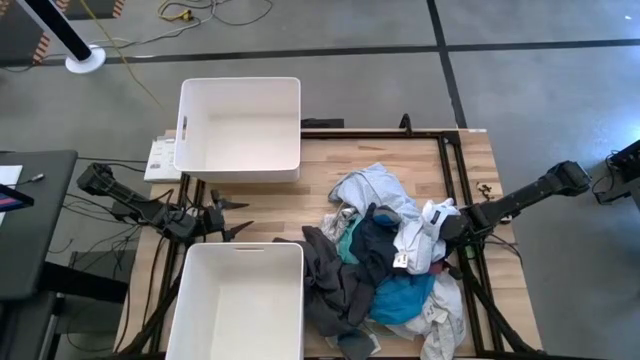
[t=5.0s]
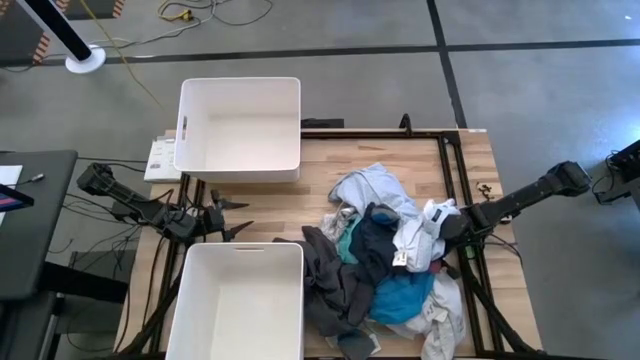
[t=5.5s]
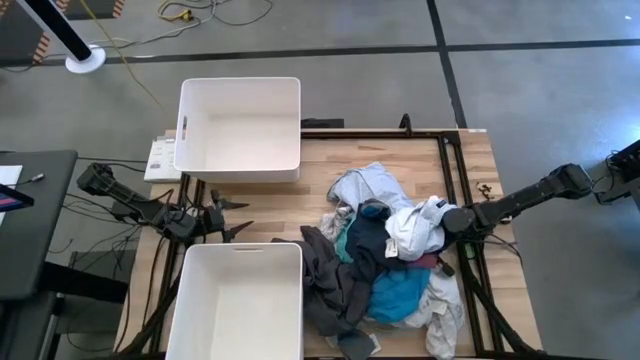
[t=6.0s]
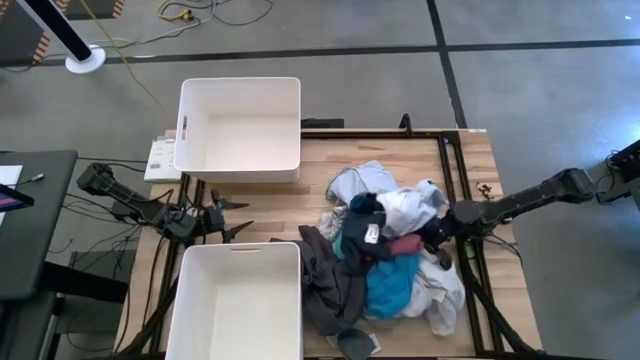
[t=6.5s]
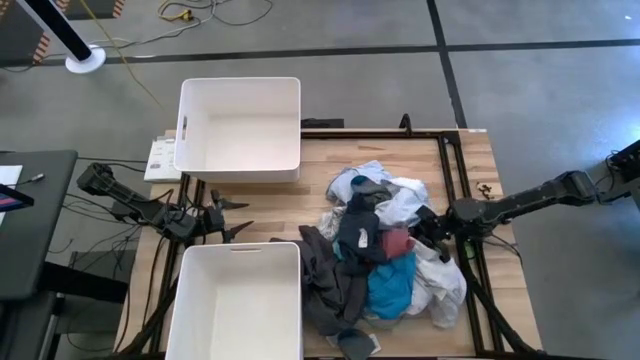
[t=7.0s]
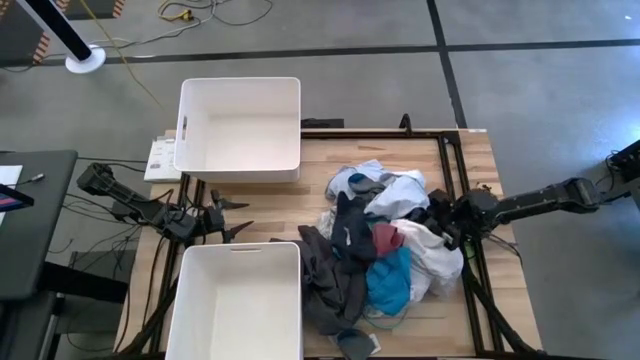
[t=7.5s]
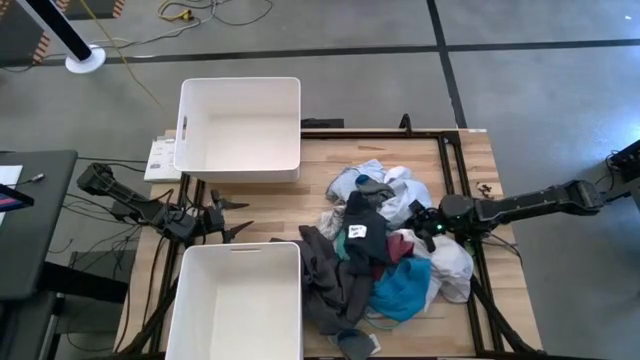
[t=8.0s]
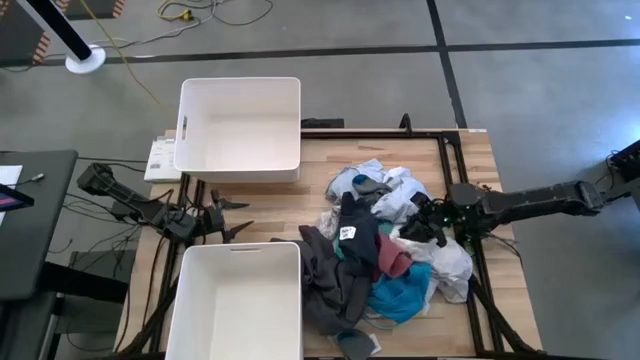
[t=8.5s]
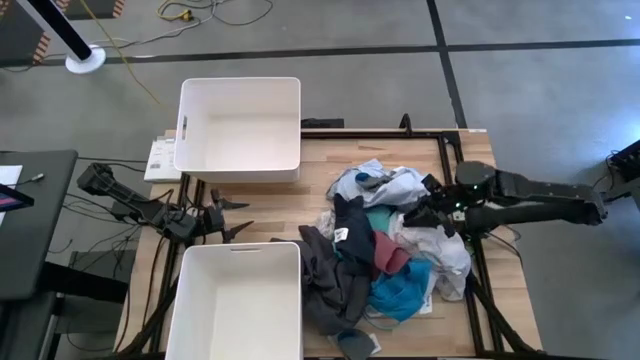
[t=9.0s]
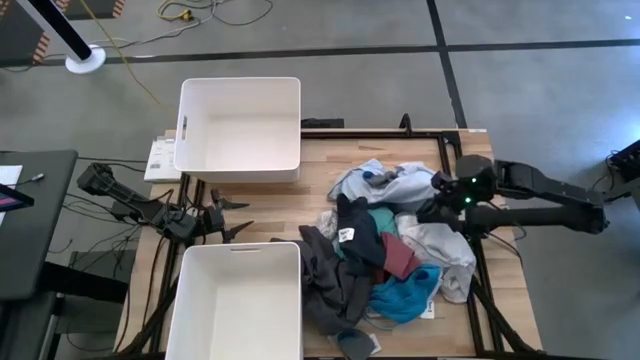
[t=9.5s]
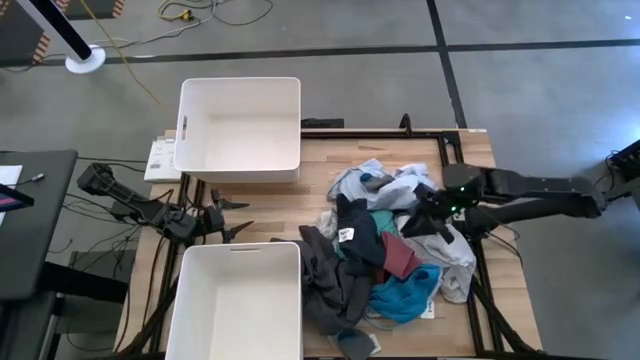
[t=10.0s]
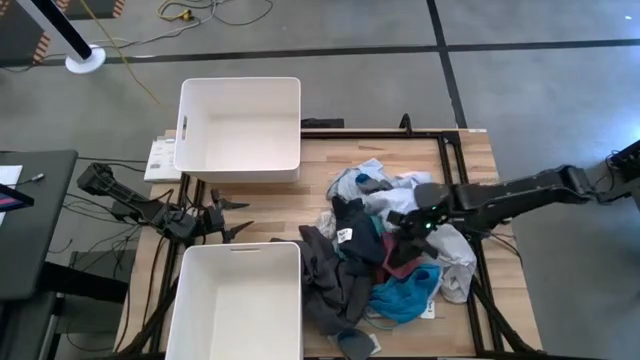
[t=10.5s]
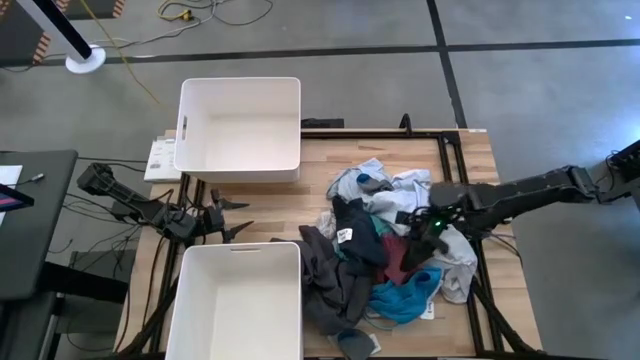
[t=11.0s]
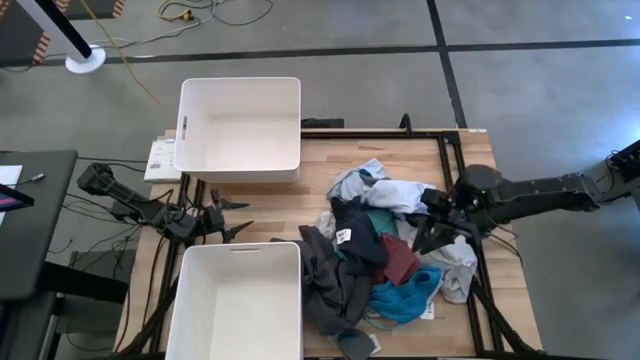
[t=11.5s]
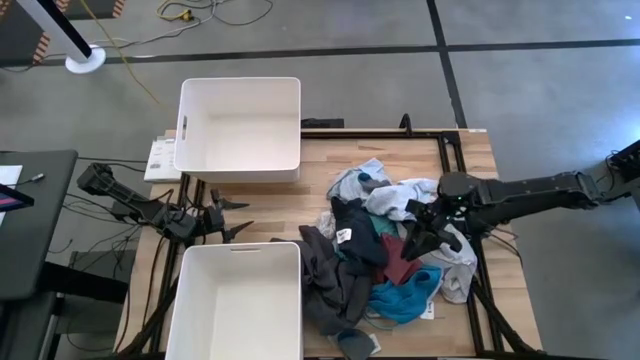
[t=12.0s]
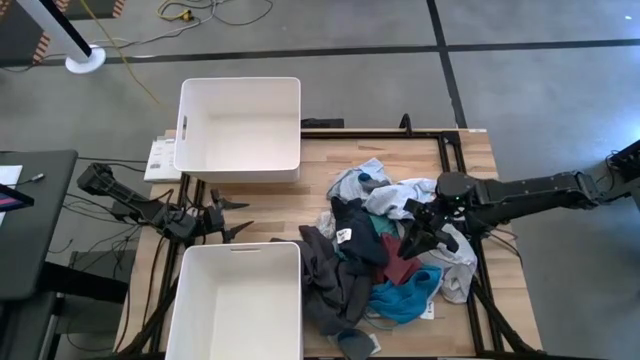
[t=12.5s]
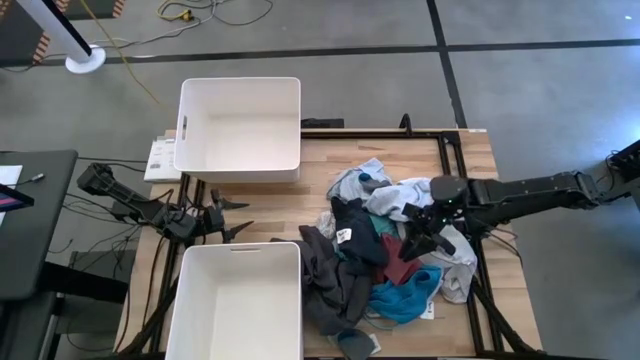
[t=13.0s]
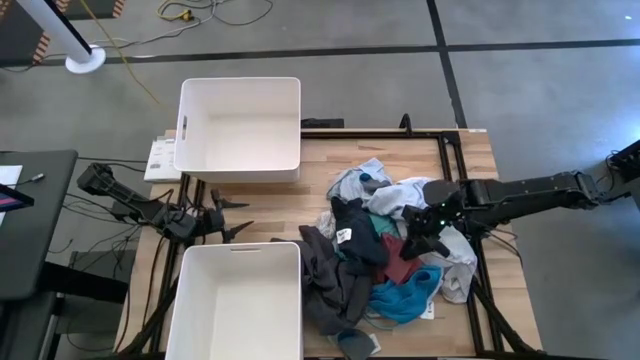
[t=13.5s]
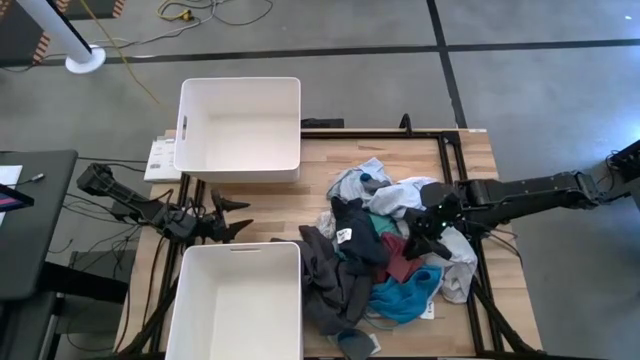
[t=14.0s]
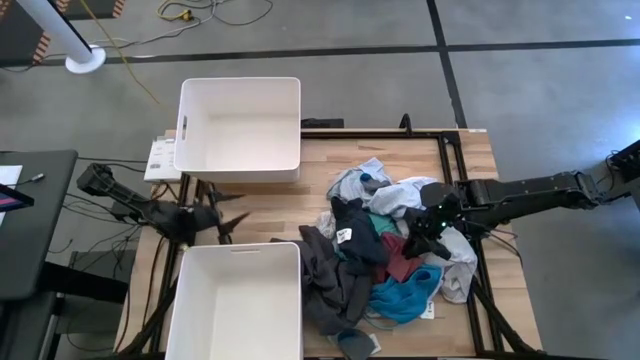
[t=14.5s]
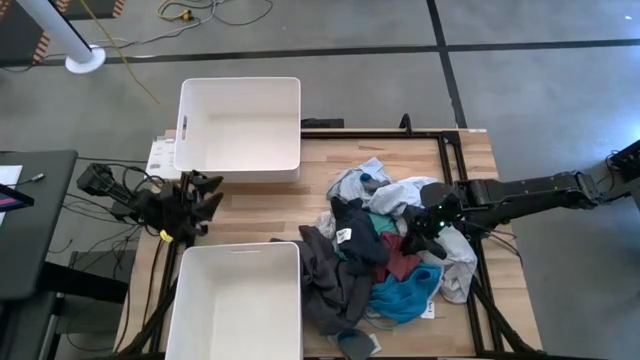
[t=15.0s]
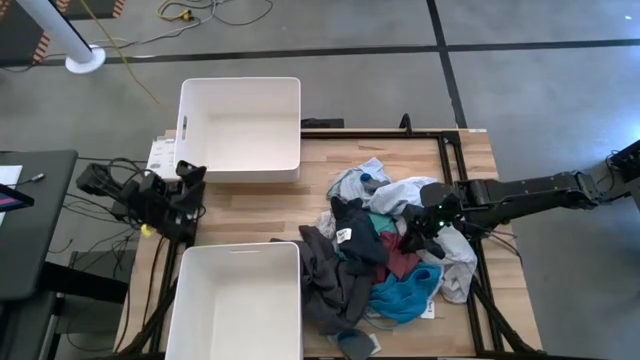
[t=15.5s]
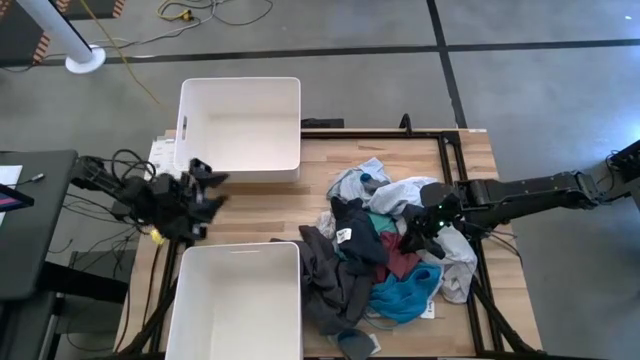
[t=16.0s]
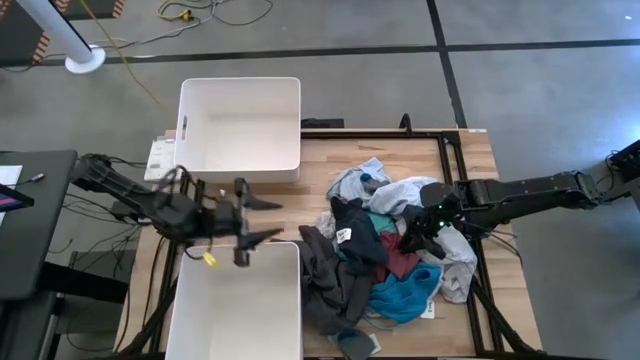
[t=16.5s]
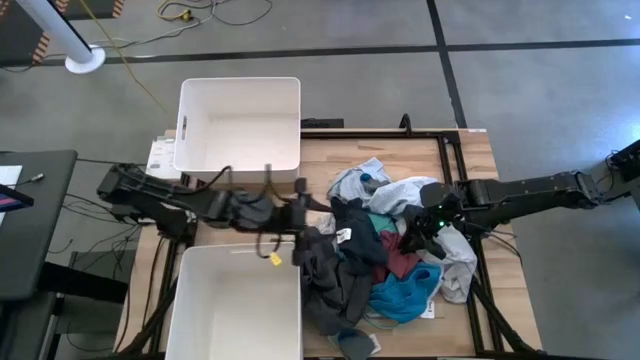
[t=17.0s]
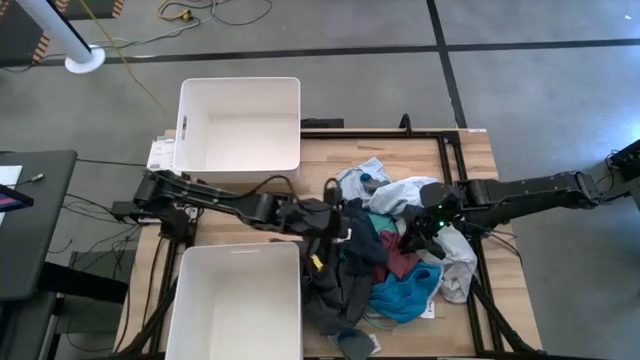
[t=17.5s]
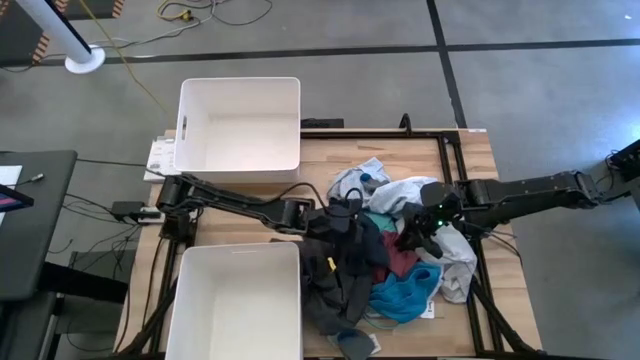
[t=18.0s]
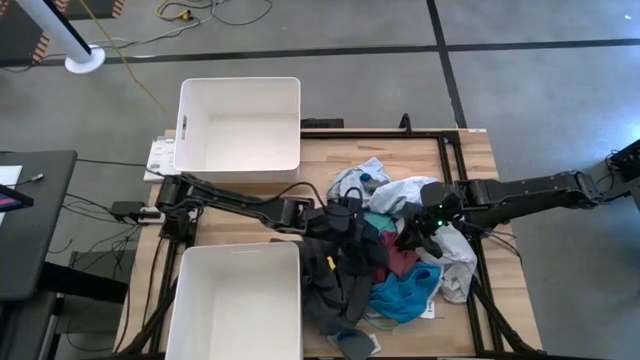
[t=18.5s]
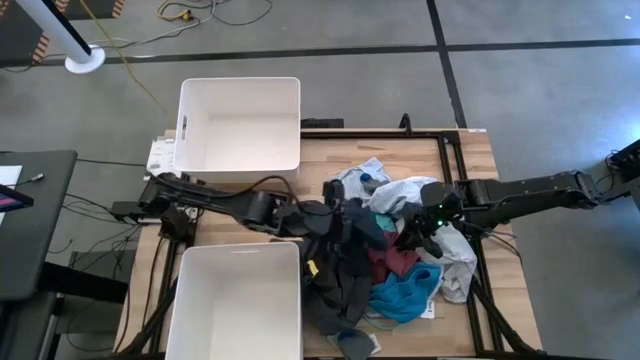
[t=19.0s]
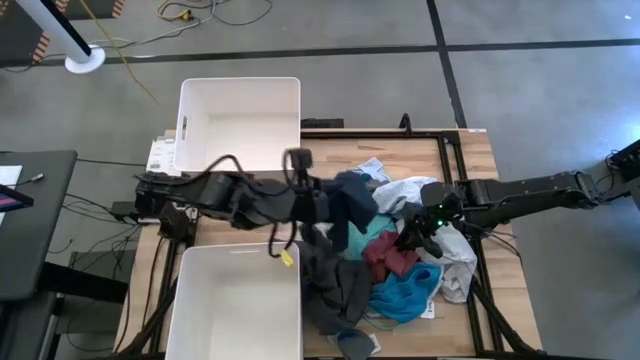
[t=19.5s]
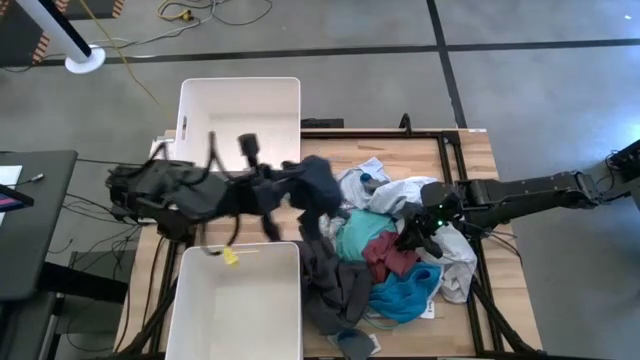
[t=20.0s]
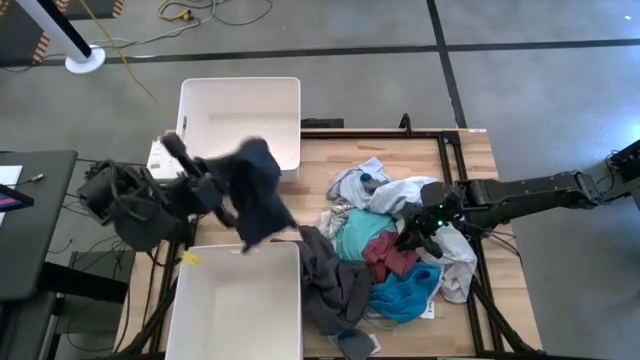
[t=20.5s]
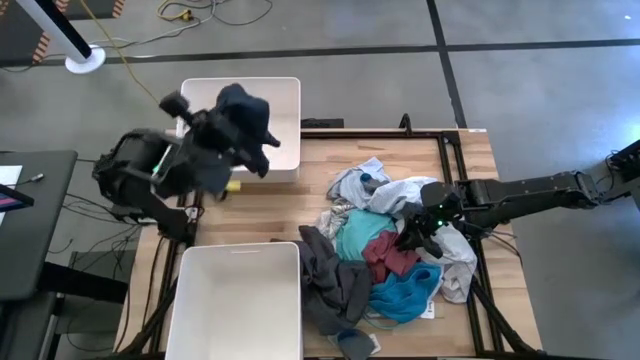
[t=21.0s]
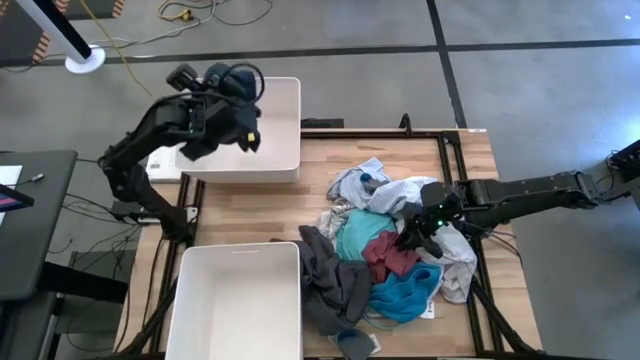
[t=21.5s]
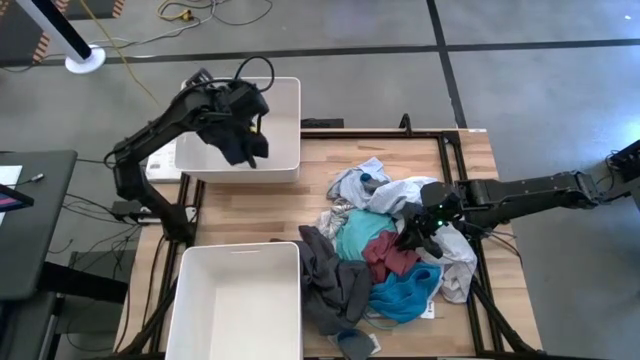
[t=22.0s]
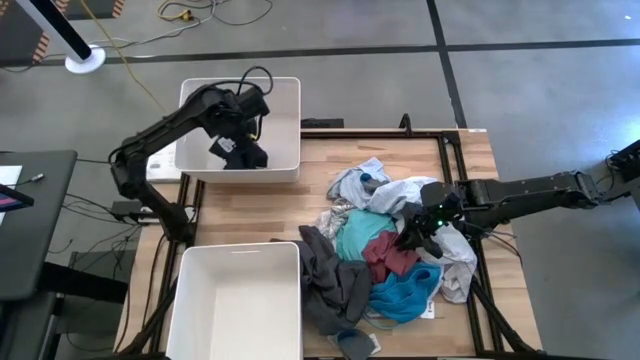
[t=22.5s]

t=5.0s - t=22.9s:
Task: Sort clothes
Put the dark blue shorts into the top white laundry bin

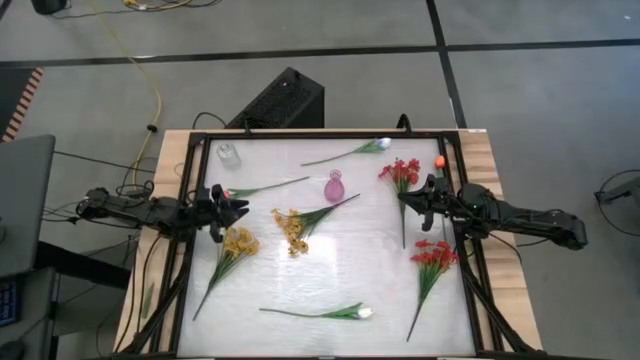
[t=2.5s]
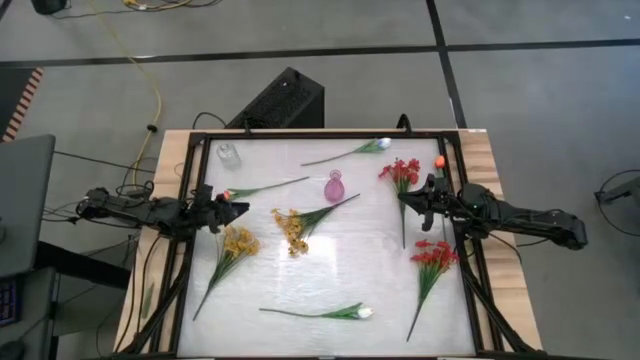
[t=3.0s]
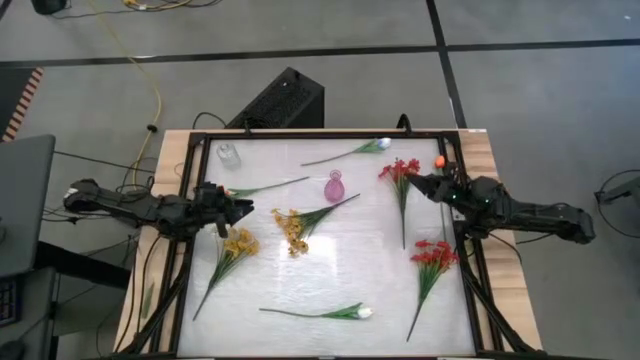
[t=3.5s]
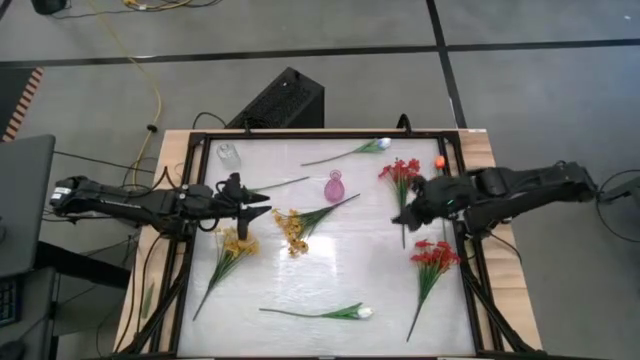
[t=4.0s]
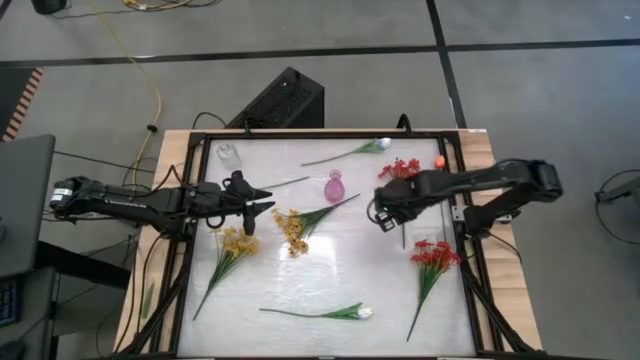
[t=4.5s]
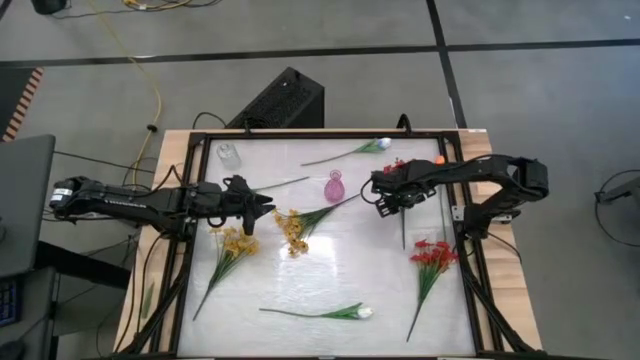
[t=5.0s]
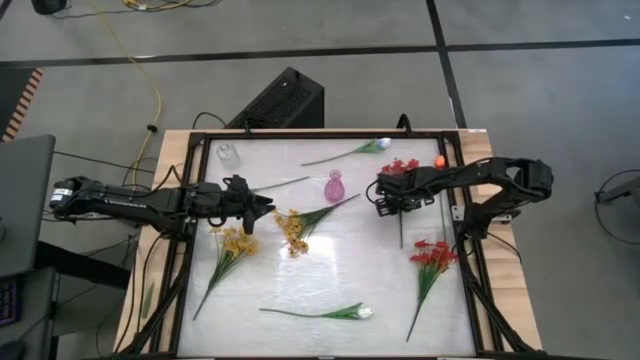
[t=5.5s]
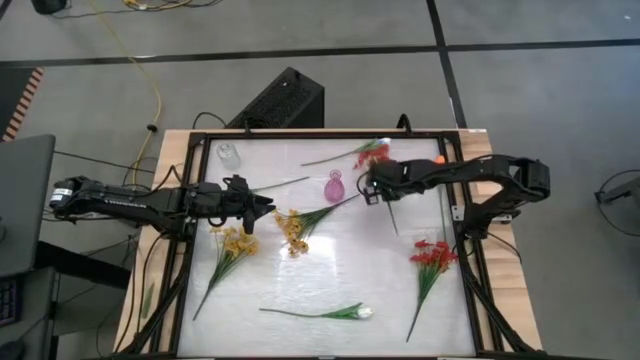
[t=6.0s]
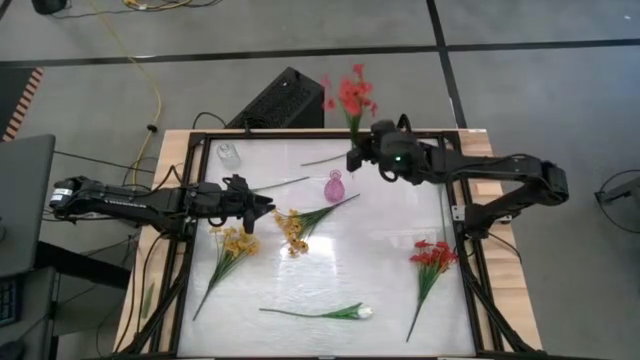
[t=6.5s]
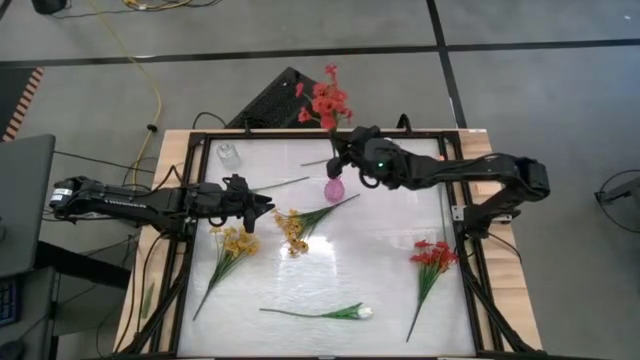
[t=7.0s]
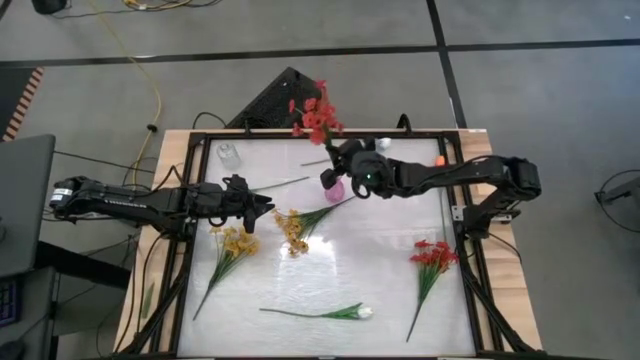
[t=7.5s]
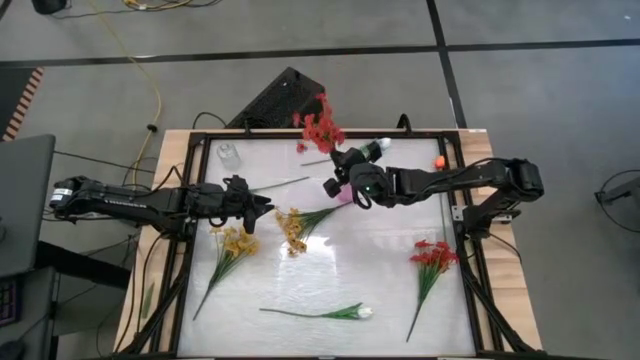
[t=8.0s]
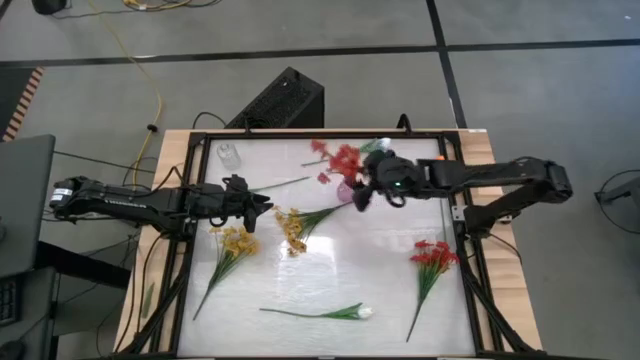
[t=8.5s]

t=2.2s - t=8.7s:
Task: Sort flowers into vase by color
Put the top red flower into the violet vase
